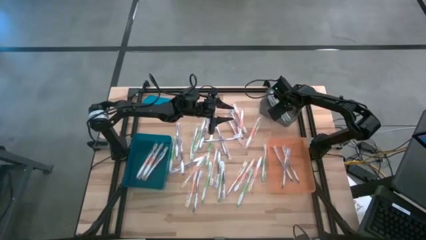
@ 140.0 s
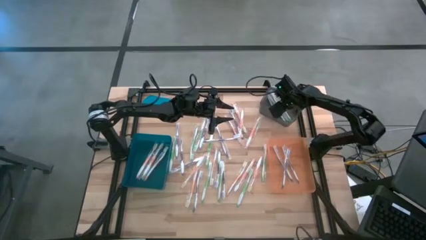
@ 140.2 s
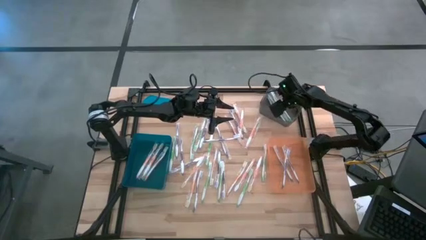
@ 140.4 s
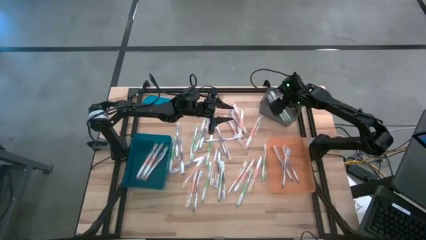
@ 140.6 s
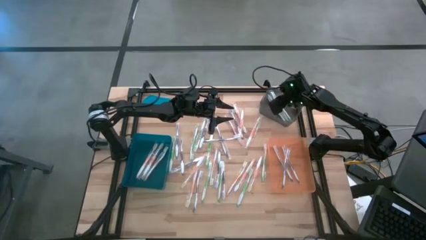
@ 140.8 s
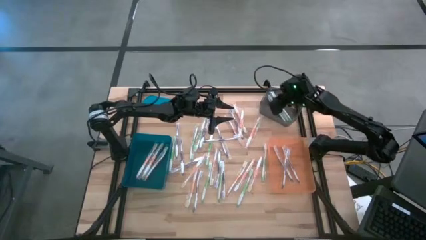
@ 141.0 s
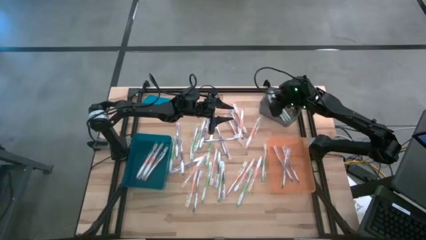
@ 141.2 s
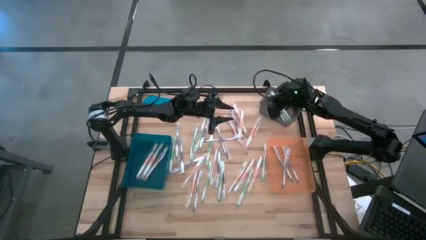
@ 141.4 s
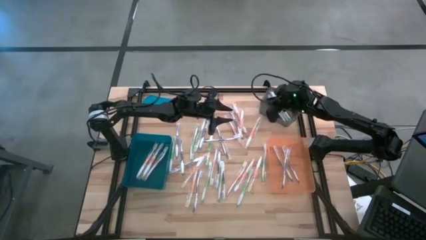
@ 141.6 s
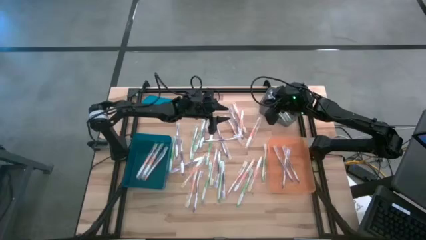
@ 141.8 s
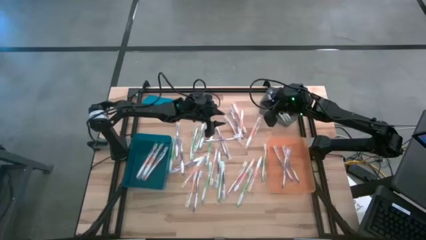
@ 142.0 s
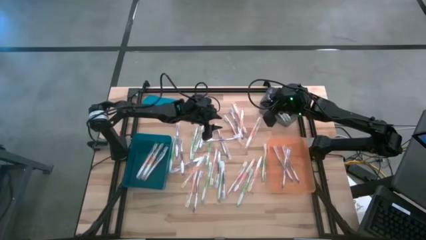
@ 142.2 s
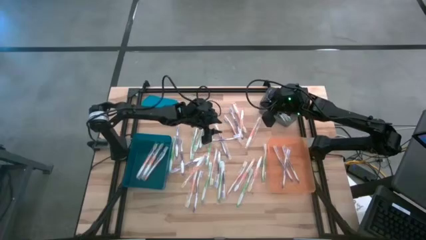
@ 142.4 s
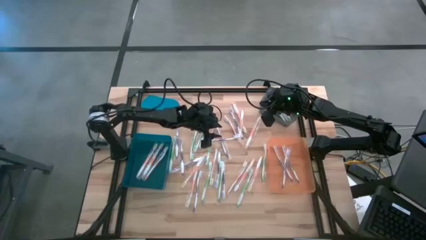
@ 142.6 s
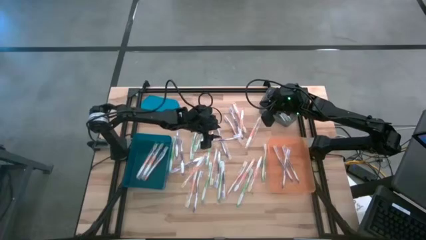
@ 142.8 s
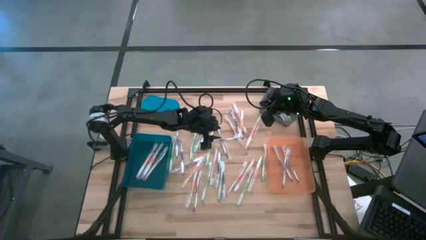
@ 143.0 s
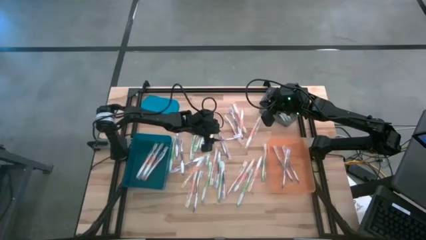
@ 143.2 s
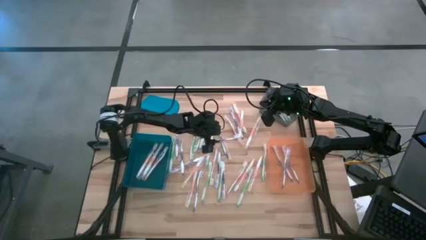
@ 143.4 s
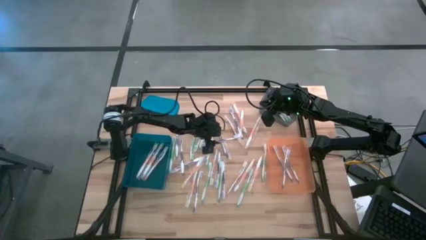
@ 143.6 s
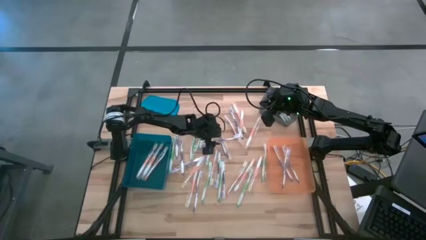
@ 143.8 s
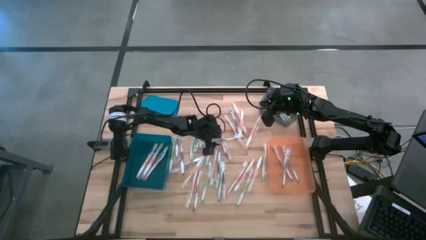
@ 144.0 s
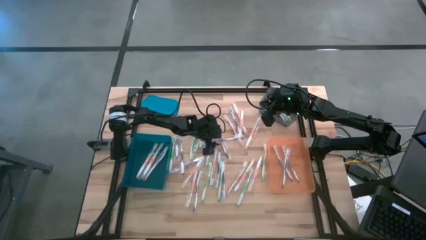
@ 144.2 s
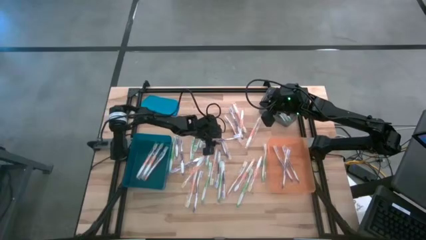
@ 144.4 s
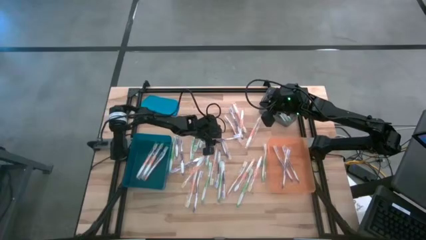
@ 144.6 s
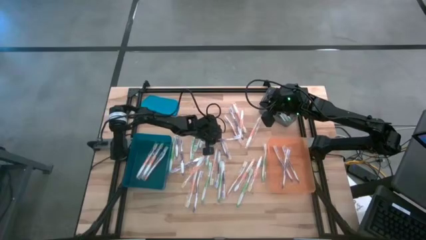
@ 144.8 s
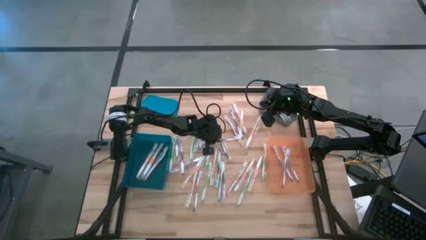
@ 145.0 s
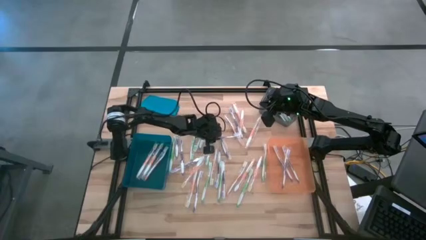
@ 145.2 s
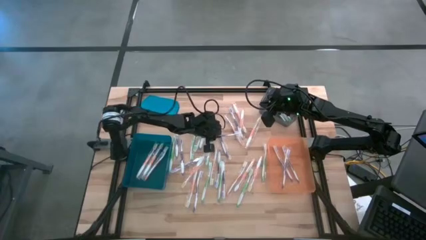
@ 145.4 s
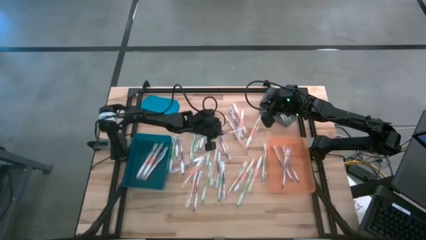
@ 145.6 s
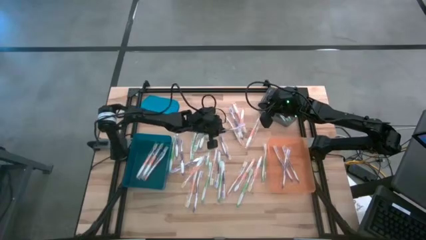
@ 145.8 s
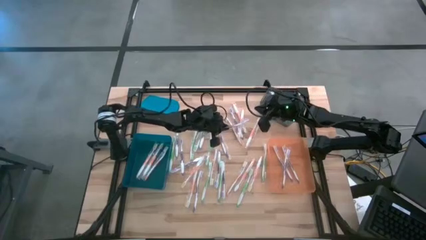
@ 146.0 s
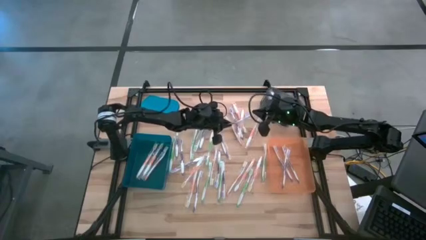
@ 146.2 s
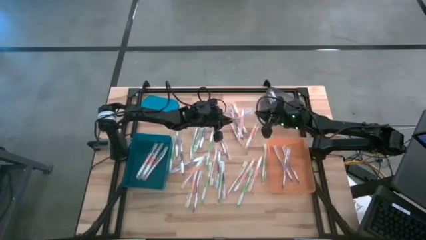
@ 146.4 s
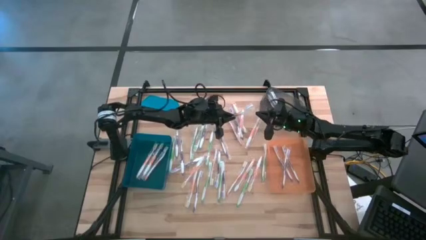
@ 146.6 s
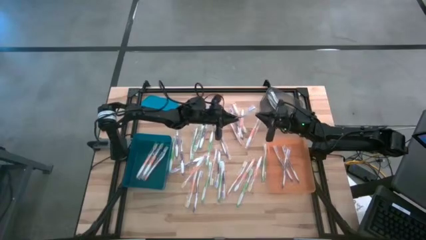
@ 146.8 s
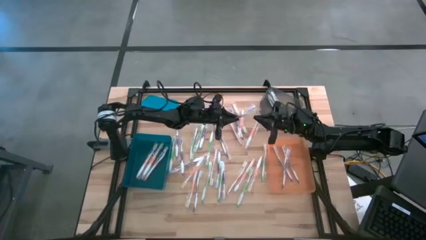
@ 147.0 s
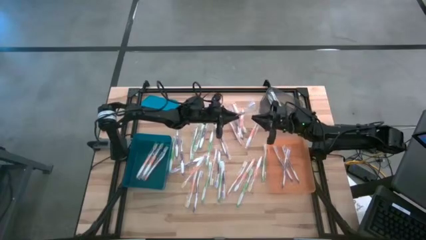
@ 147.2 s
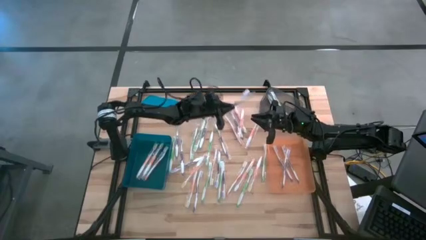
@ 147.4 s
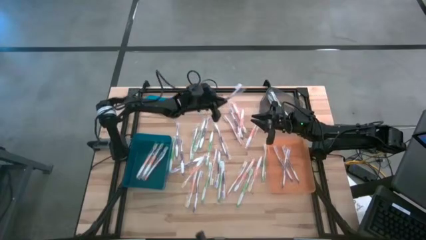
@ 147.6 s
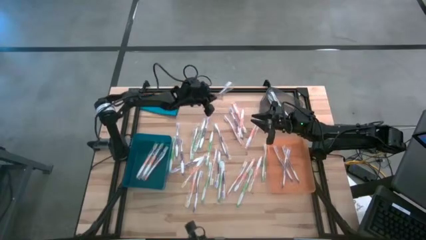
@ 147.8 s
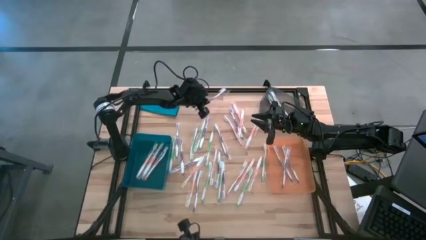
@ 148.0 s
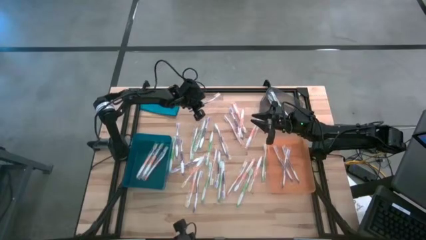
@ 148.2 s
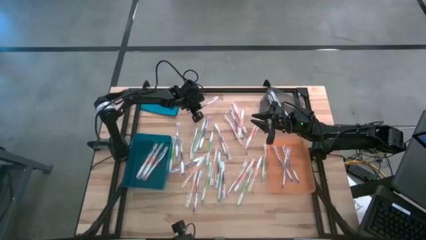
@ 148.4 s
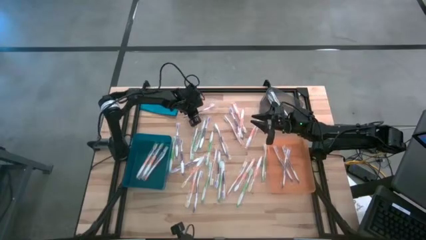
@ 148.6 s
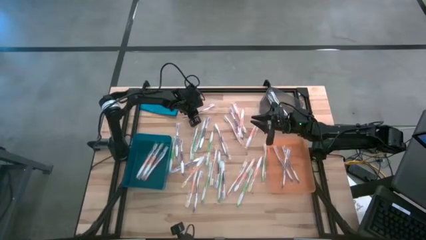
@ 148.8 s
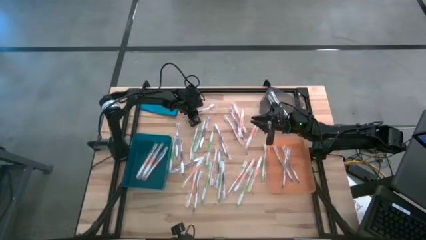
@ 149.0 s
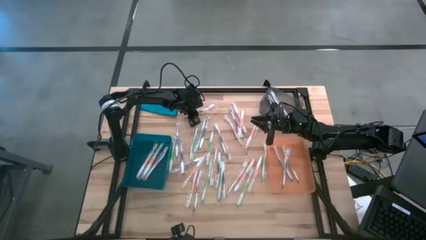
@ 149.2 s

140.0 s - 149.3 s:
Task: Pick & Place Toothbrushes
Move the purple toothbrush to the top left of the table

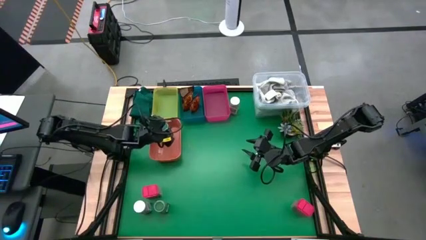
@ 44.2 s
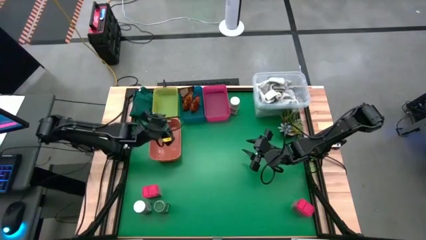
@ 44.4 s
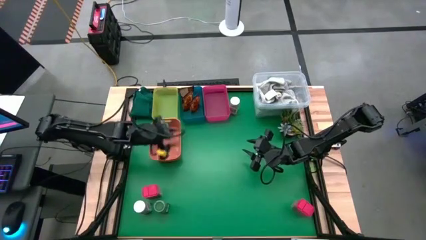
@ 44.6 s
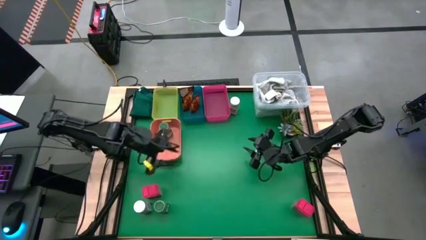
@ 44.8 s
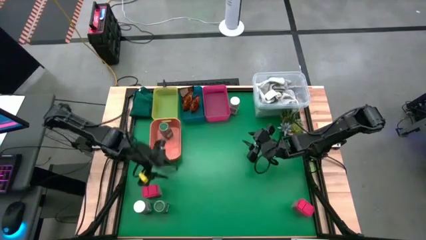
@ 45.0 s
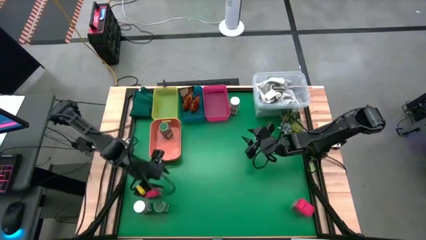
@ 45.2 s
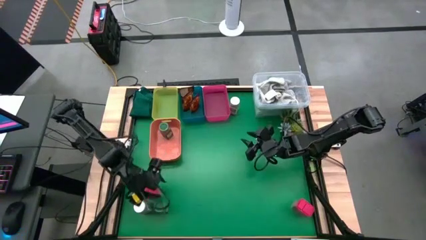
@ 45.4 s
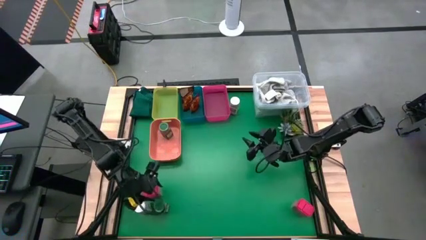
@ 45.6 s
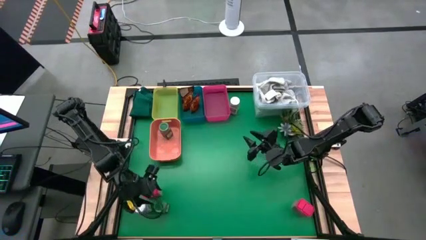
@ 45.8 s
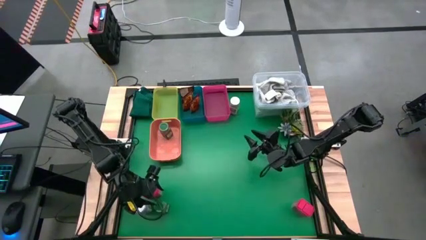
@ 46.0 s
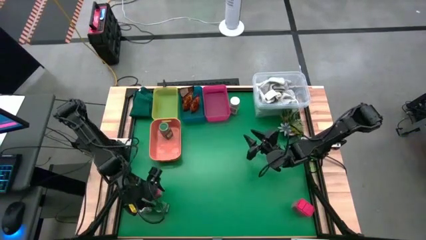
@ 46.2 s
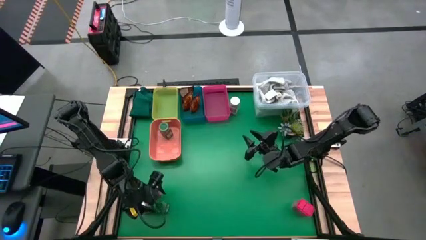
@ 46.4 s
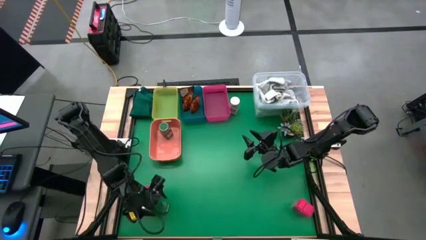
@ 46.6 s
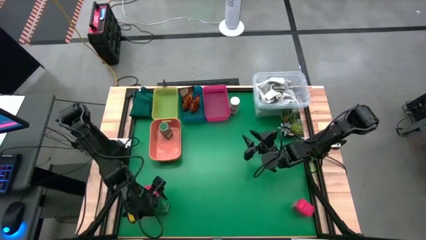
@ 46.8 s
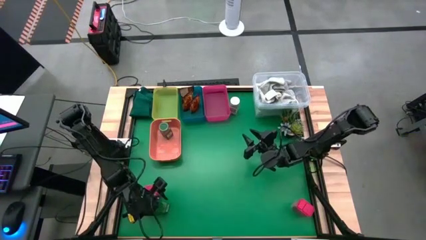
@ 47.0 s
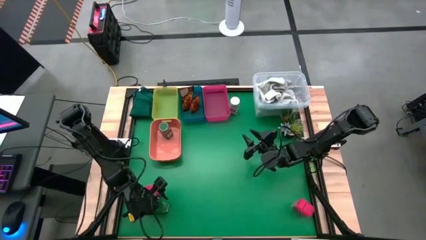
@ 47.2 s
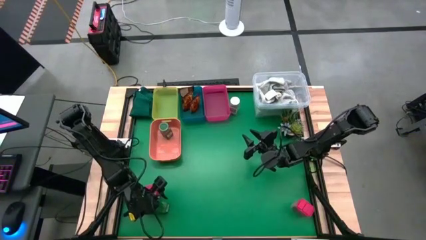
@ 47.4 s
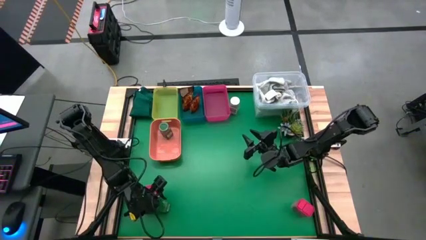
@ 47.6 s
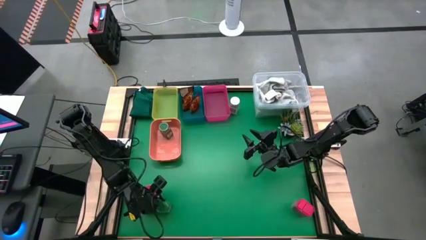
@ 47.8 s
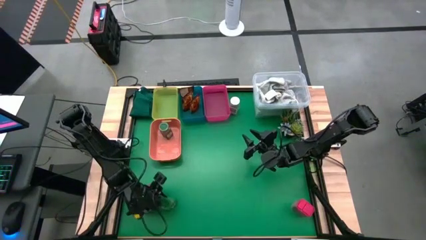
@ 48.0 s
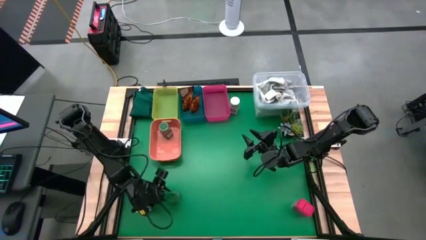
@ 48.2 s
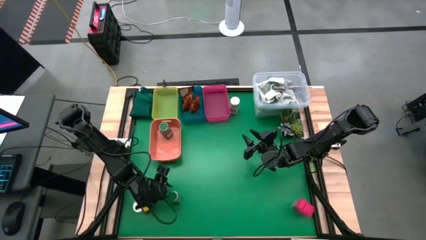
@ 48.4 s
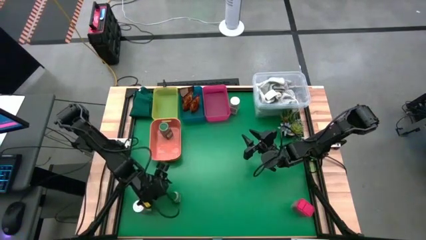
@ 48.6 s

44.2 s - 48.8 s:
Task: Sort spices by type
Put the green spice bottle into the orange bin

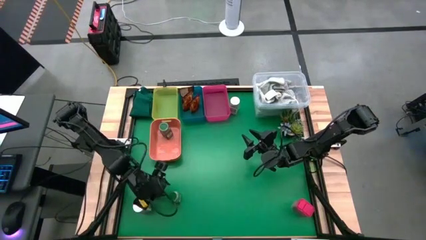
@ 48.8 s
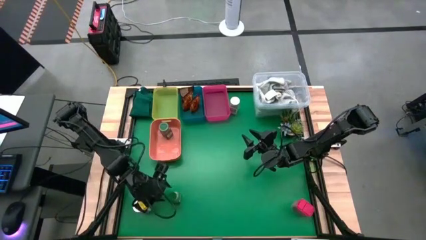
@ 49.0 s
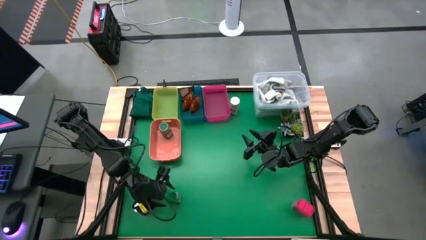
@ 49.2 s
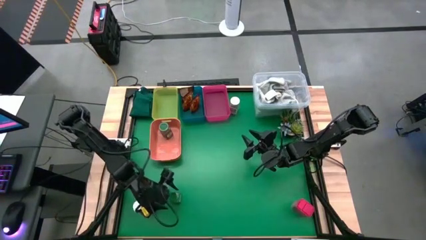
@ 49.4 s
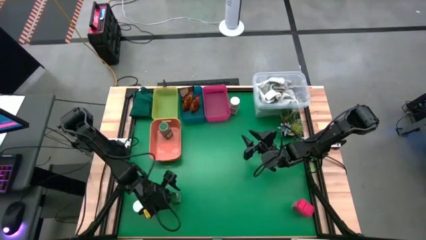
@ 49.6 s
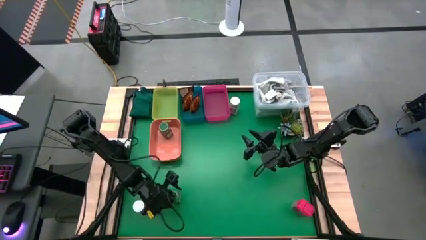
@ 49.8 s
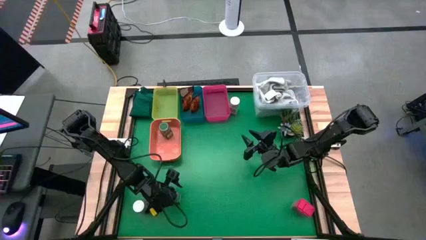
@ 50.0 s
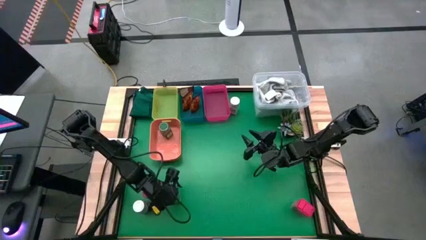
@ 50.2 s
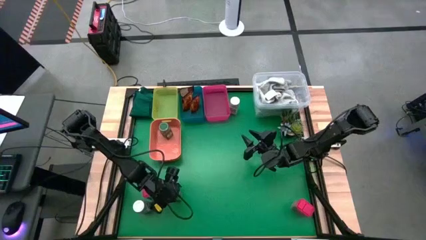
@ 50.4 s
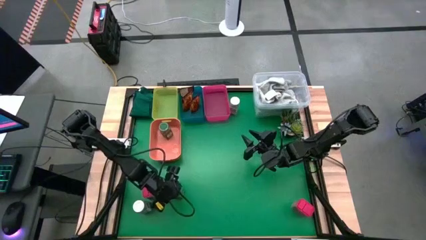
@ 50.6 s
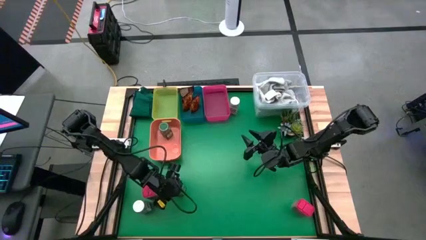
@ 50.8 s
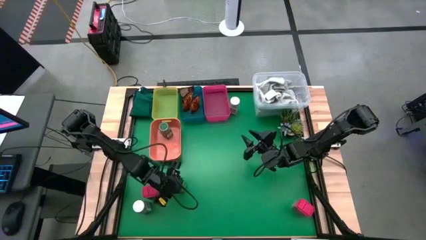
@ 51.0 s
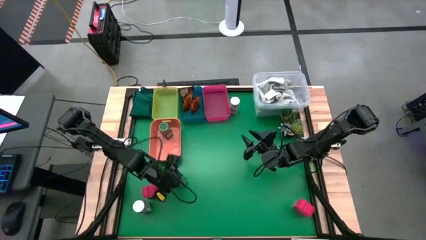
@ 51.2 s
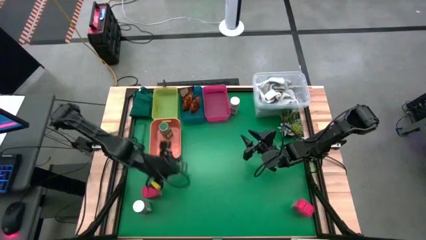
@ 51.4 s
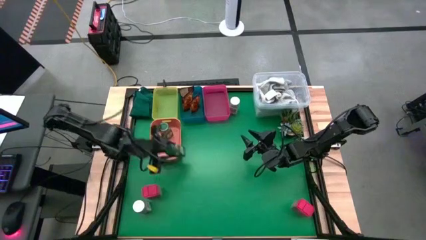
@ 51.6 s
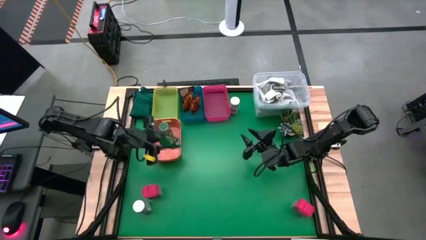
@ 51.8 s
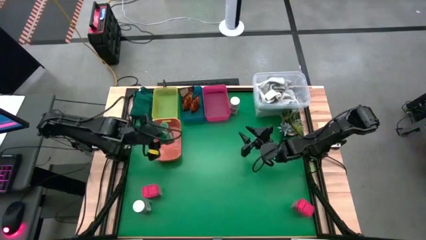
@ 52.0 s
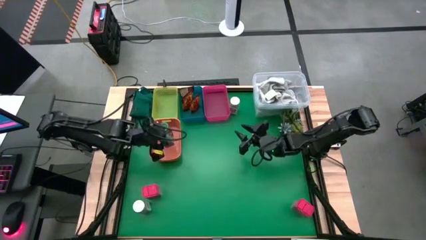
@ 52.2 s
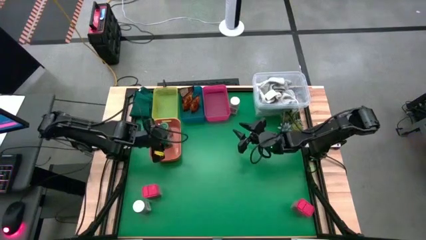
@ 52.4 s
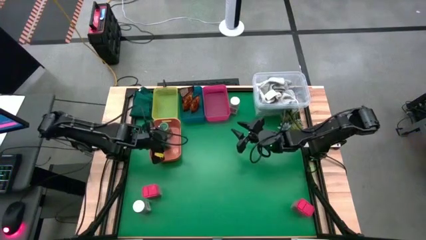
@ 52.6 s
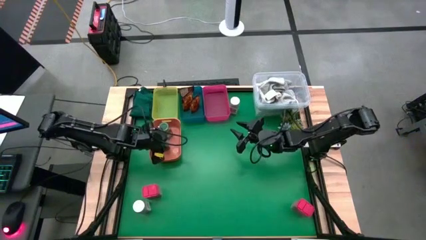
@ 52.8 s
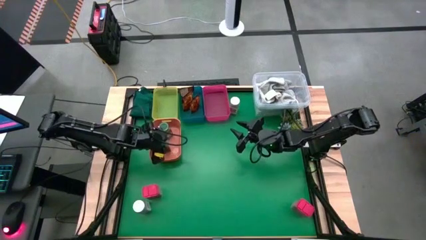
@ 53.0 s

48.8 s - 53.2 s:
Put the green spice bottle into the orange bin
